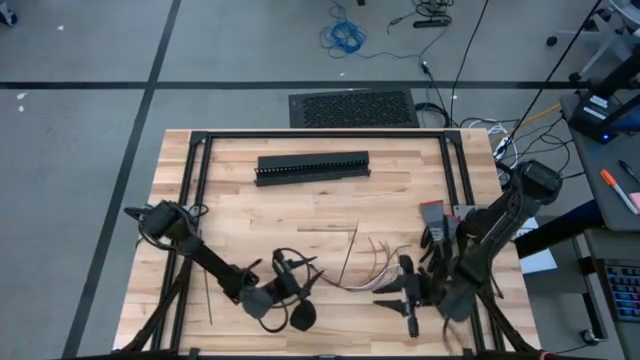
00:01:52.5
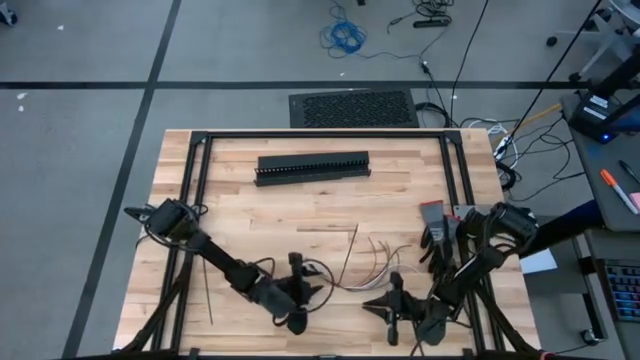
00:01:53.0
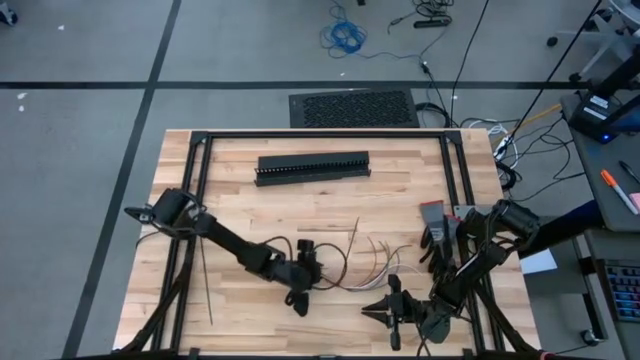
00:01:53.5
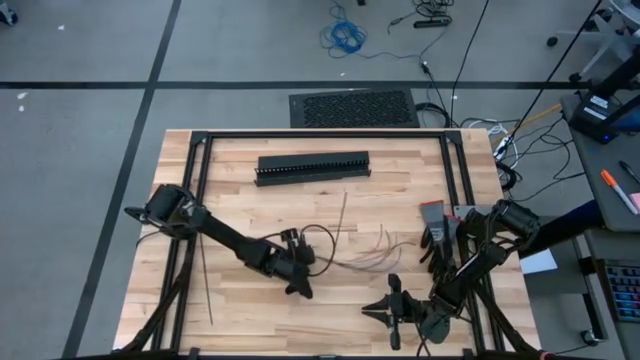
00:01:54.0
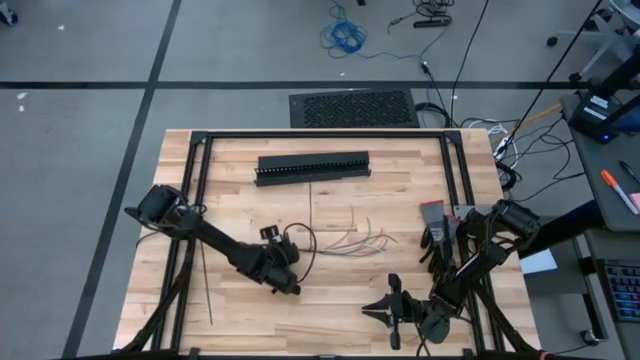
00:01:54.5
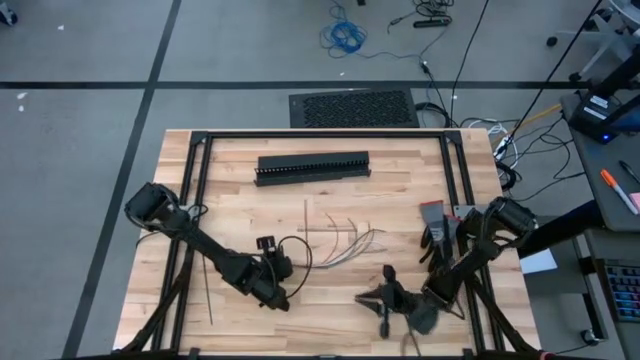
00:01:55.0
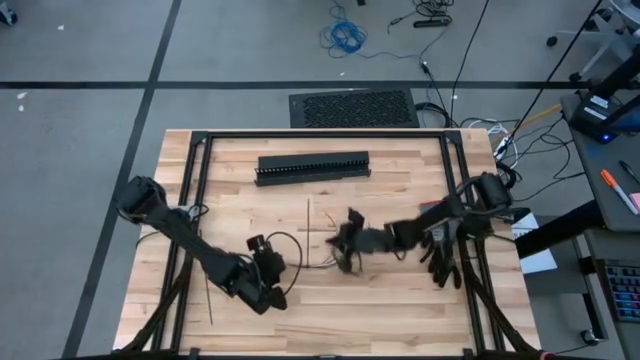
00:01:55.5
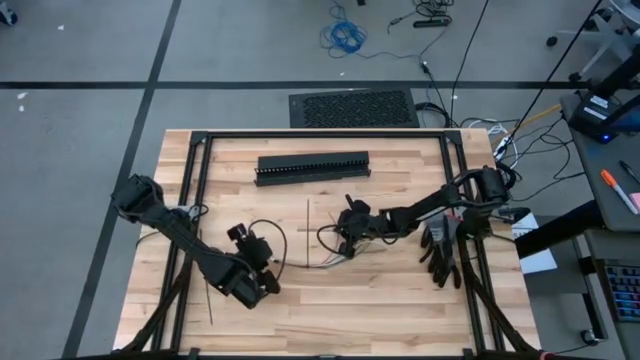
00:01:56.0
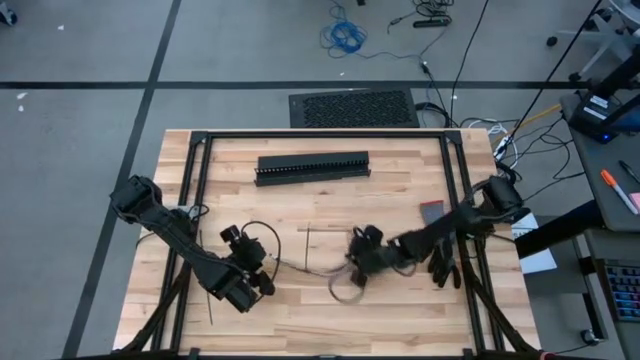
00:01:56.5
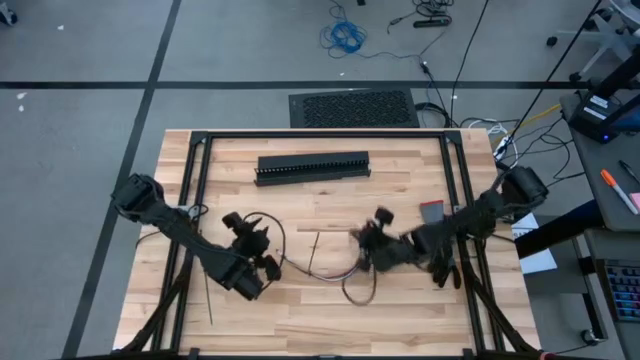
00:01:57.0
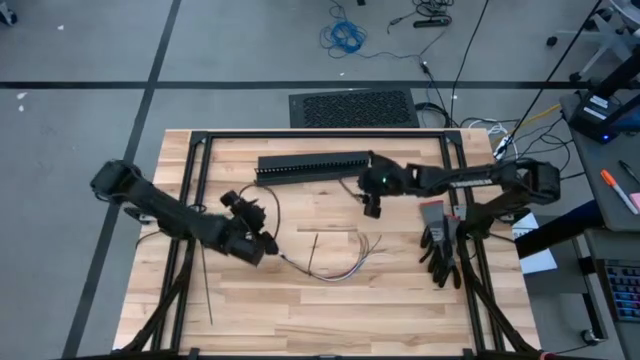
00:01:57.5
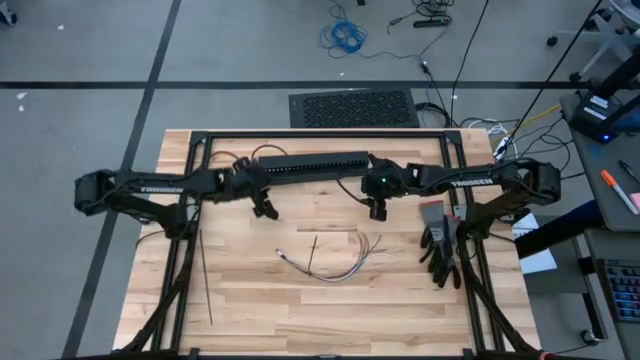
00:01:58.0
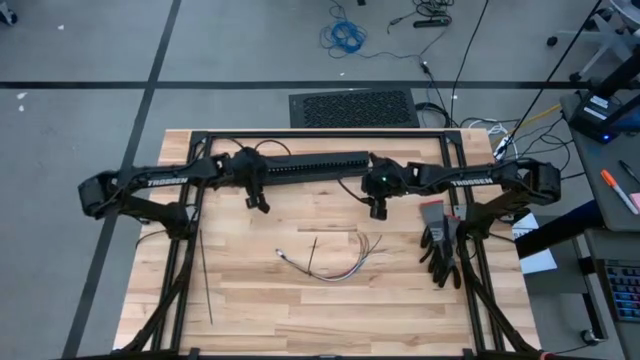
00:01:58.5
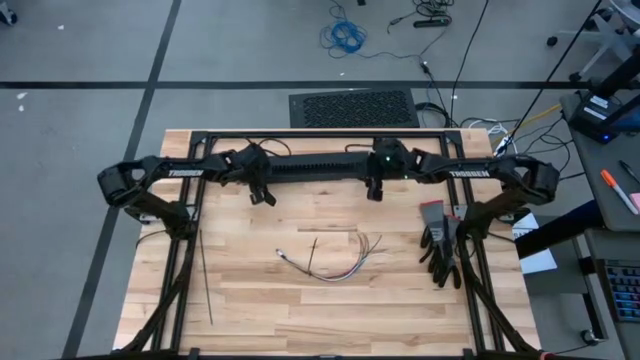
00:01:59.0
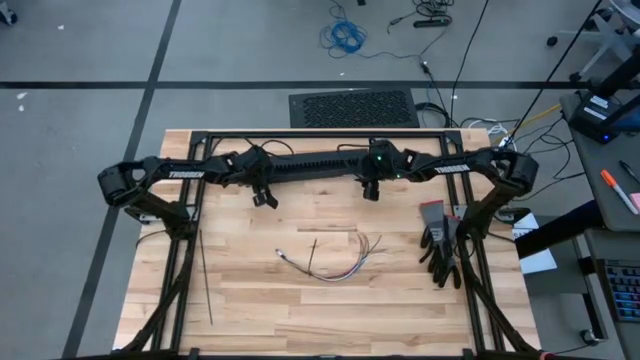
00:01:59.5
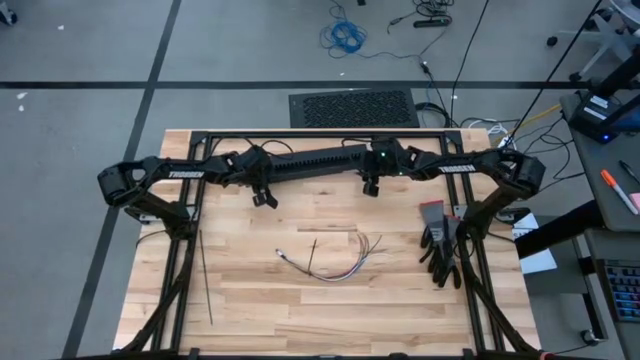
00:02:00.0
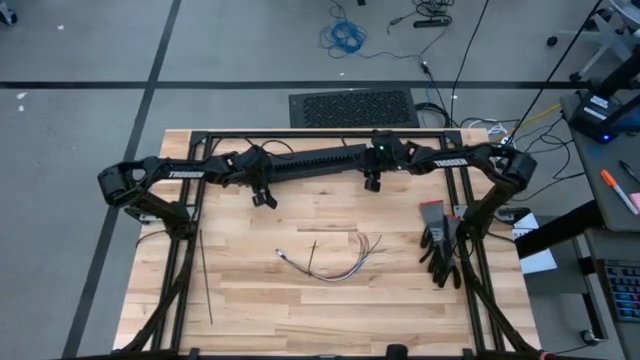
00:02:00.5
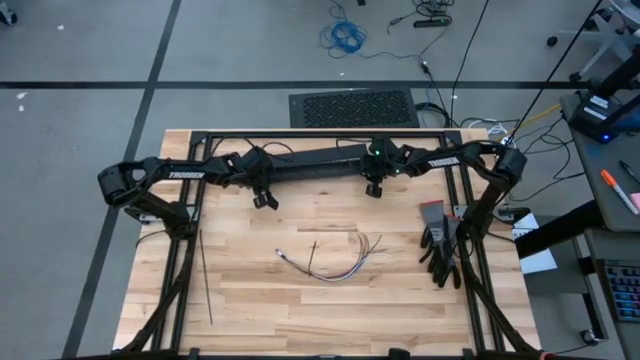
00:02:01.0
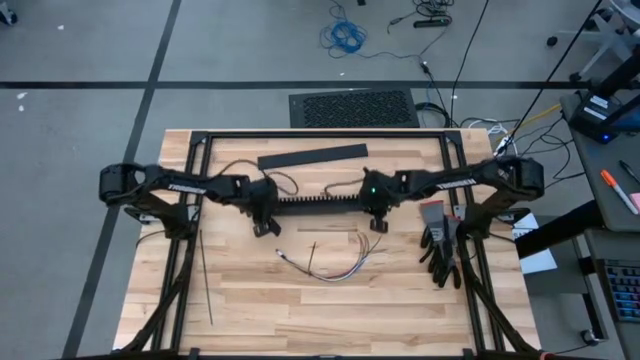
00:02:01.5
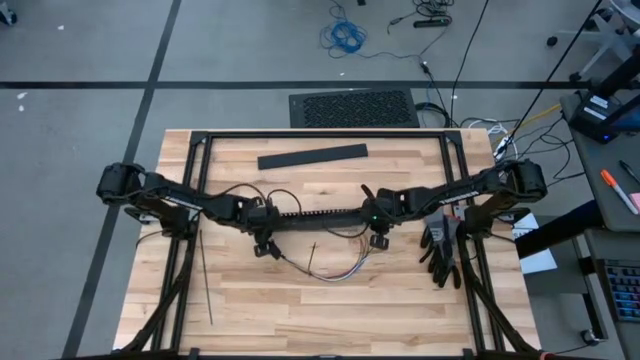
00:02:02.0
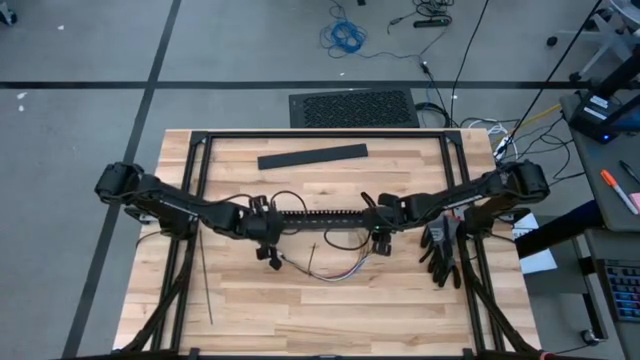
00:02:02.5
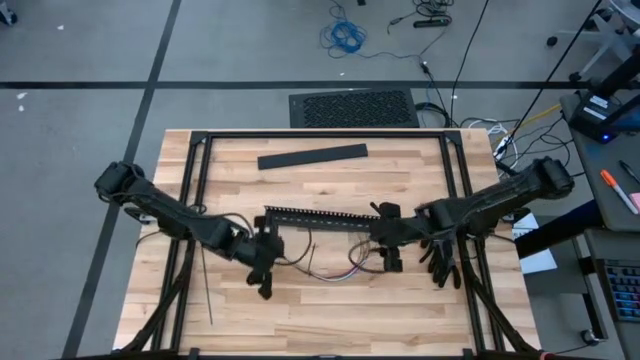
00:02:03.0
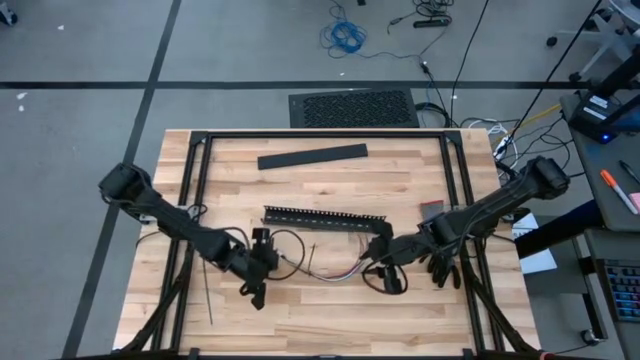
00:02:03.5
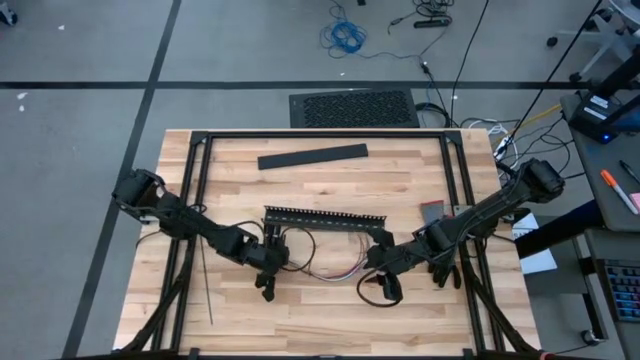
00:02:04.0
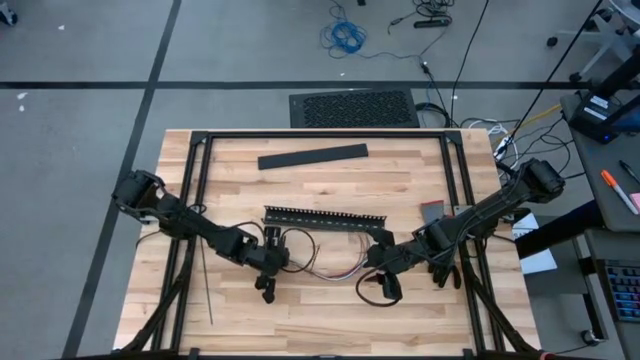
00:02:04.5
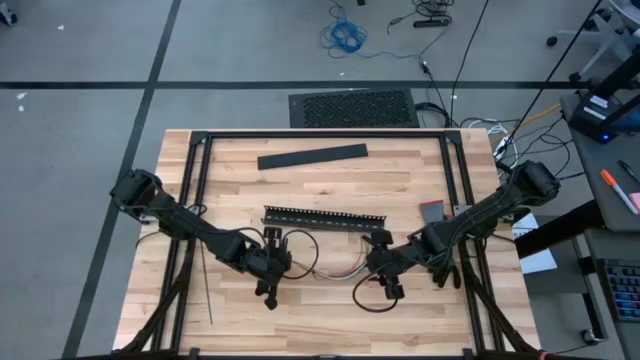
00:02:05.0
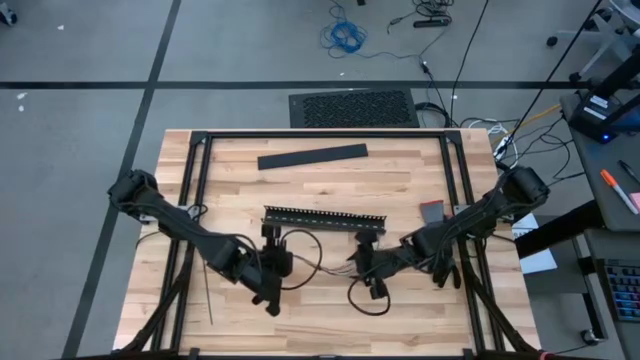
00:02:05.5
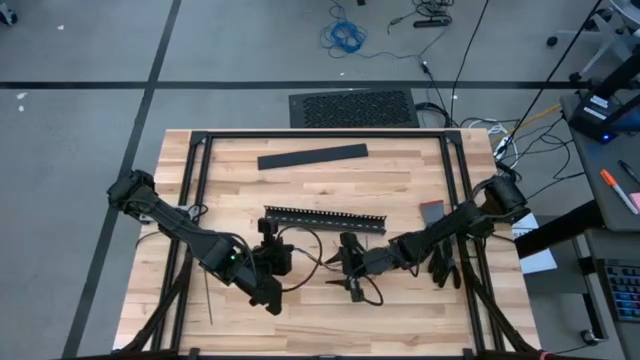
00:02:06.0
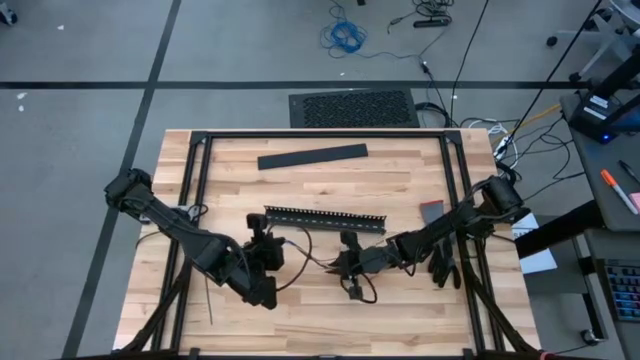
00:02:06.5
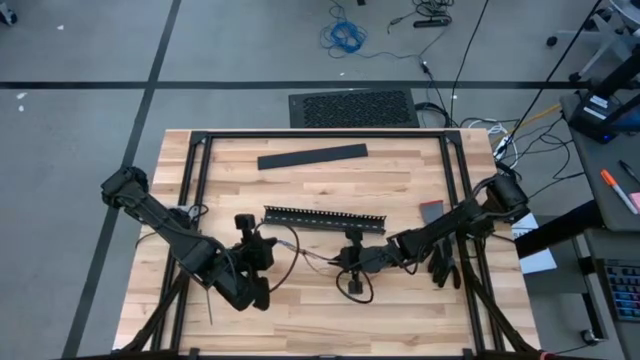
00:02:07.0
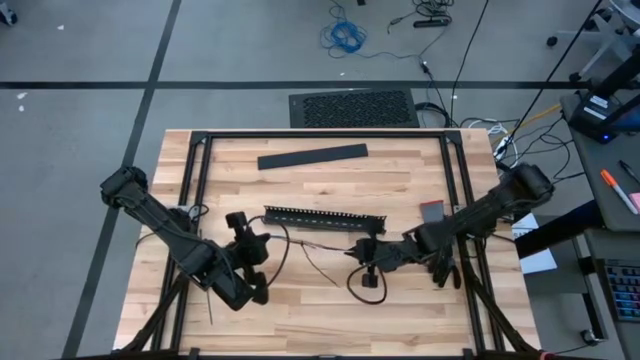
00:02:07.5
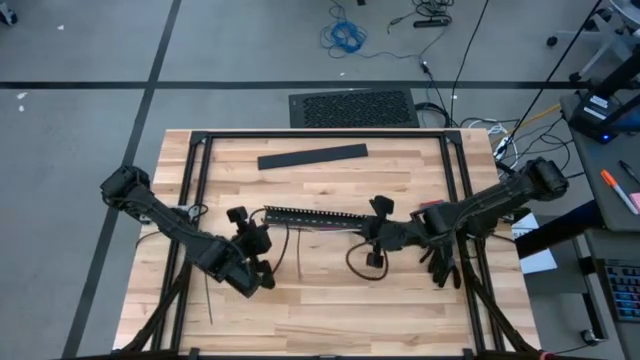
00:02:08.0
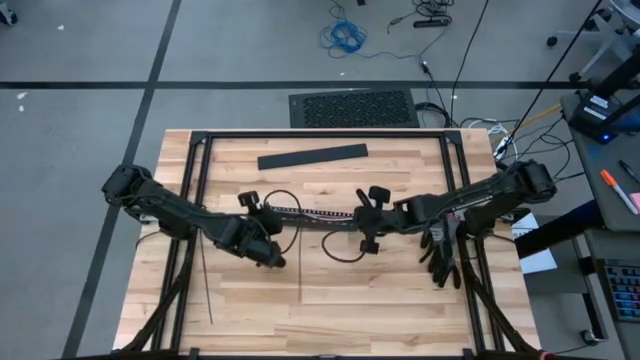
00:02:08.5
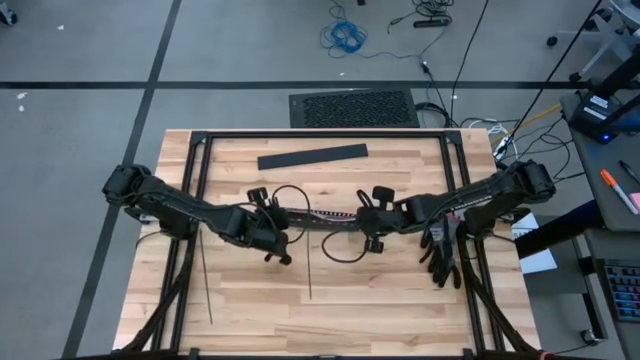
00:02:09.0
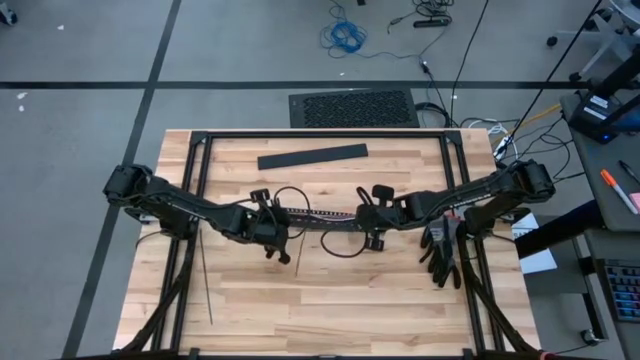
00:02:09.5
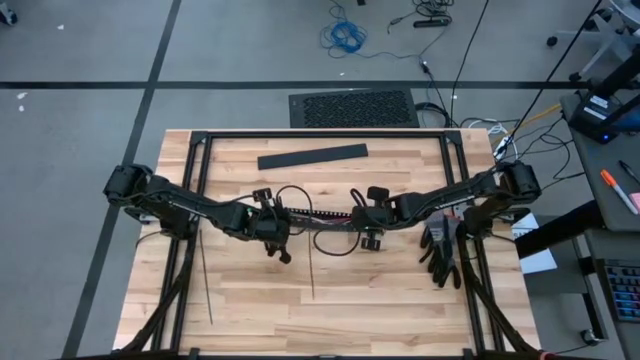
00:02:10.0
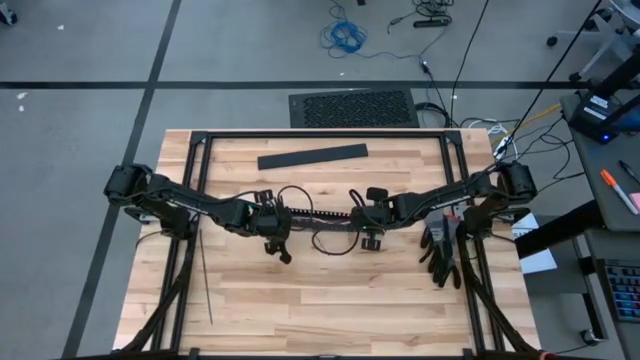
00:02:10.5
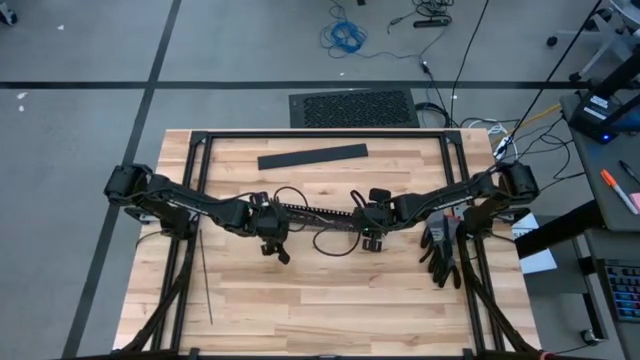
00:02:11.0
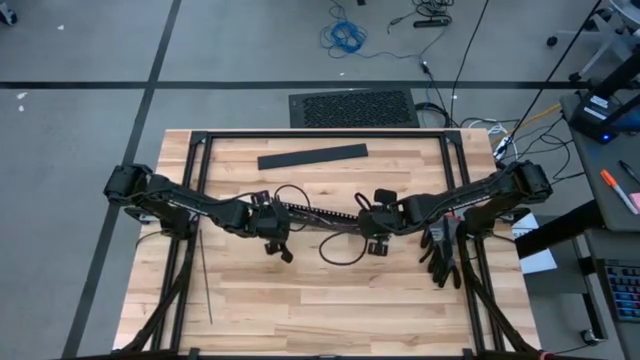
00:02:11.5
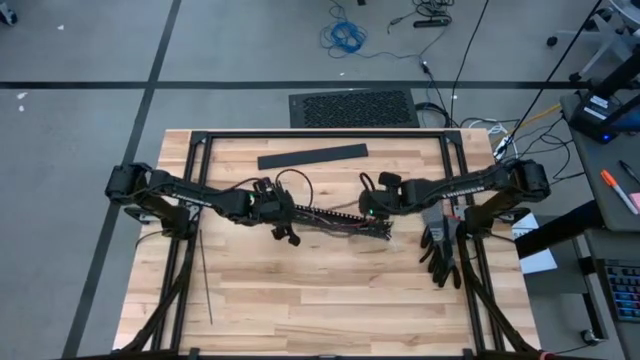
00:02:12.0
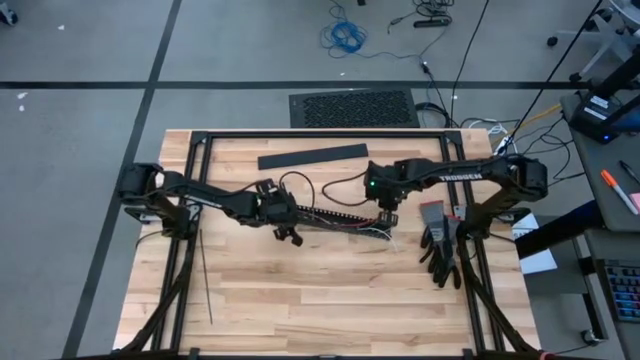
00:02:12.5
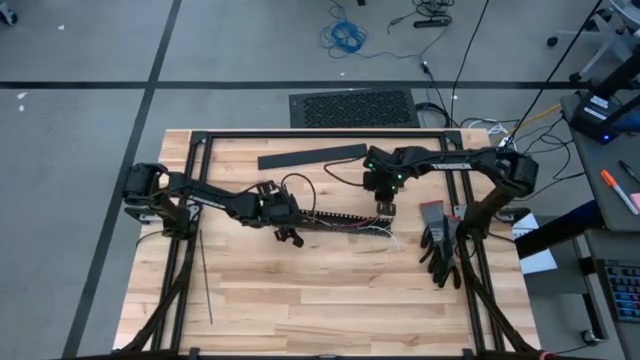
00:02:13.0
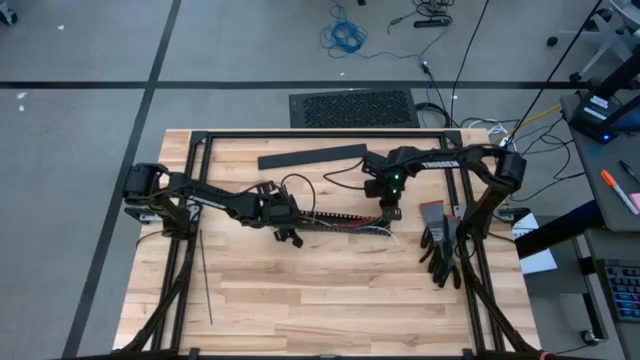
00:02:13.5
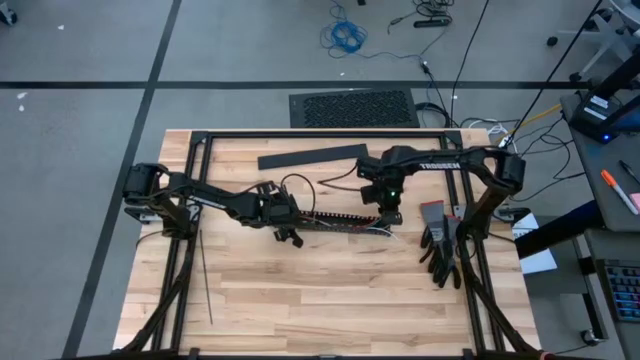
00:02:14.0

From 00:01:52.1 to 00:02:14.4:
Task: Ziptie cables
Put the zip tied cable wires into the black cable duct
